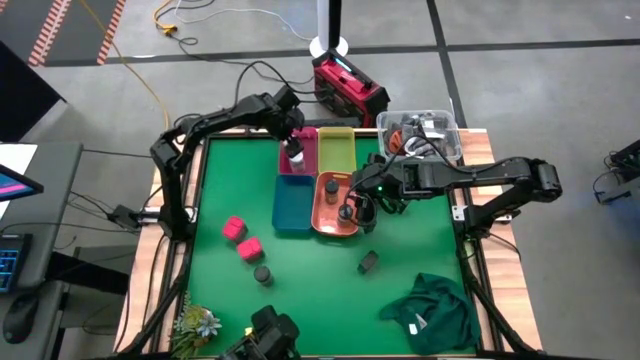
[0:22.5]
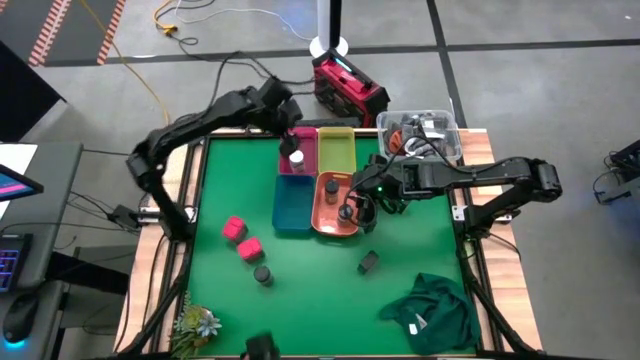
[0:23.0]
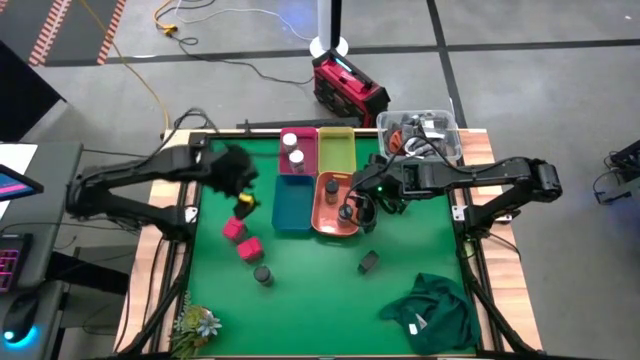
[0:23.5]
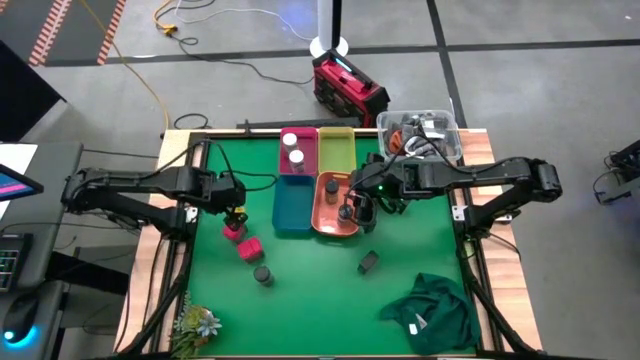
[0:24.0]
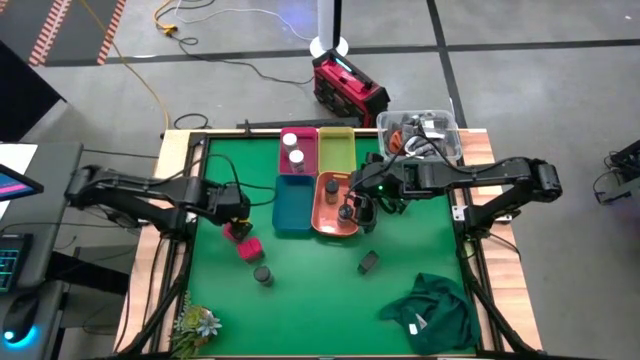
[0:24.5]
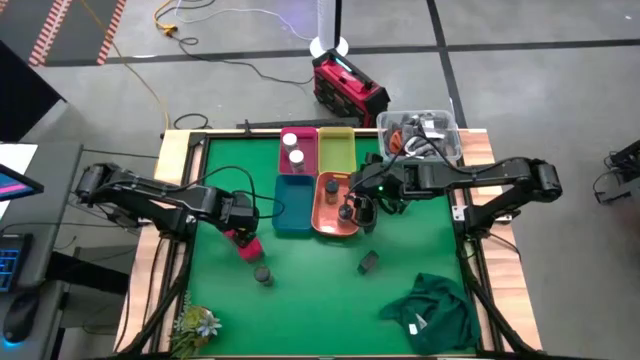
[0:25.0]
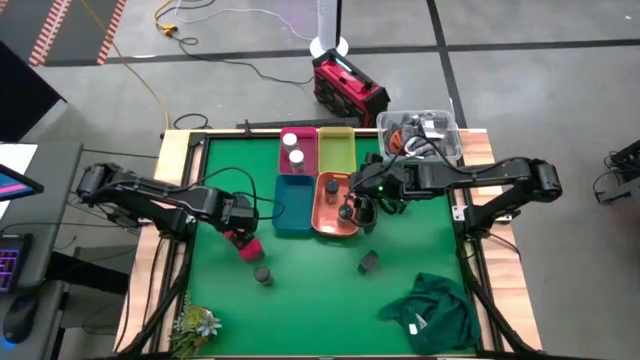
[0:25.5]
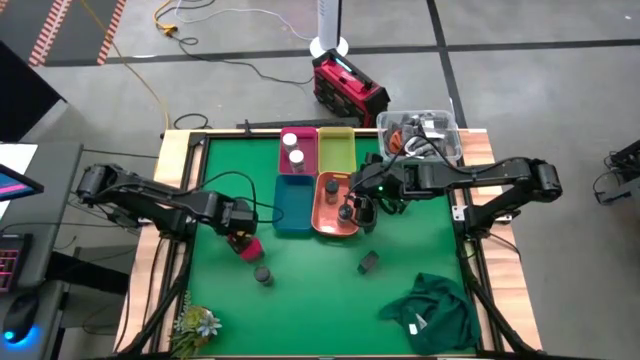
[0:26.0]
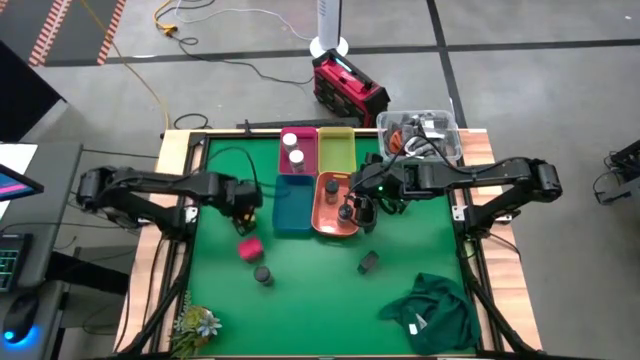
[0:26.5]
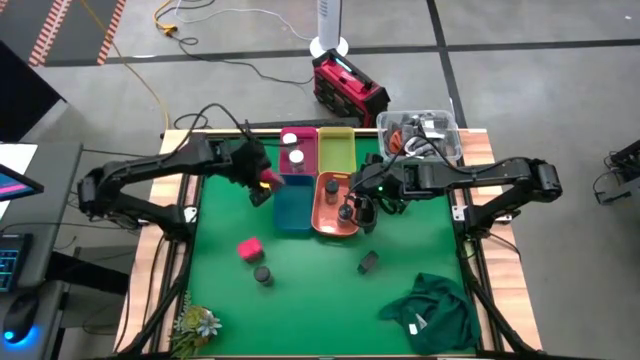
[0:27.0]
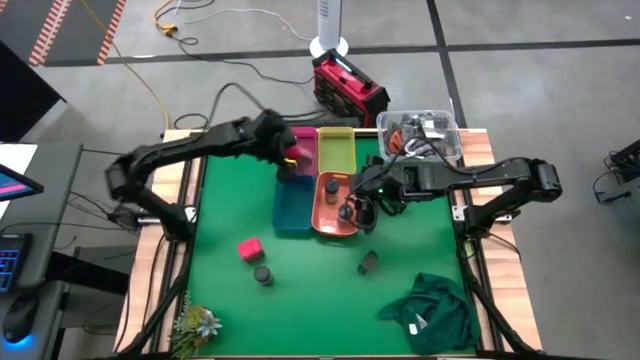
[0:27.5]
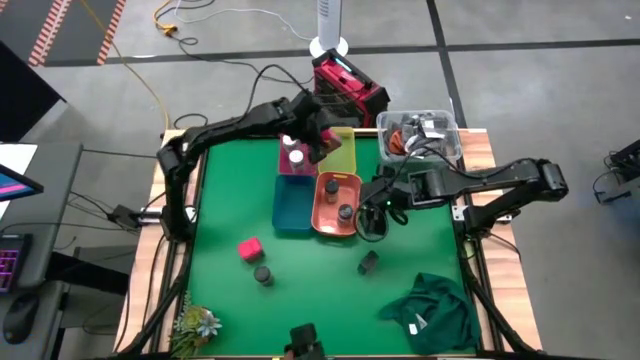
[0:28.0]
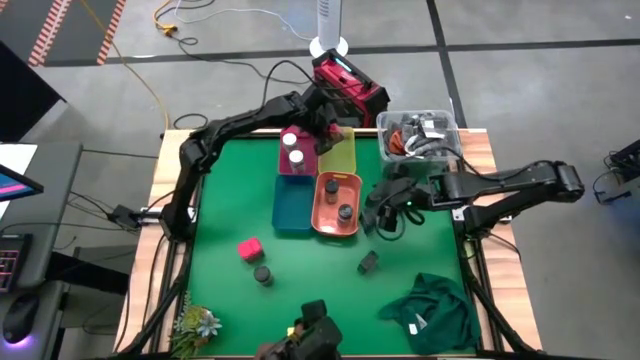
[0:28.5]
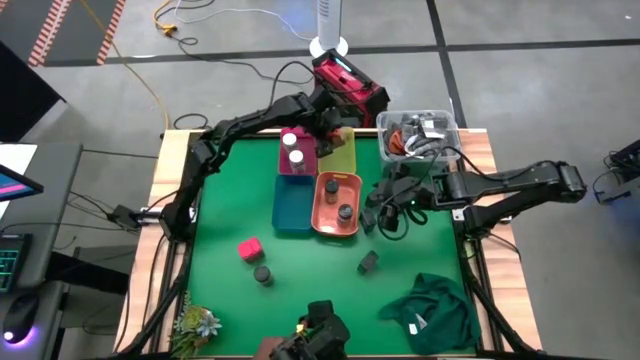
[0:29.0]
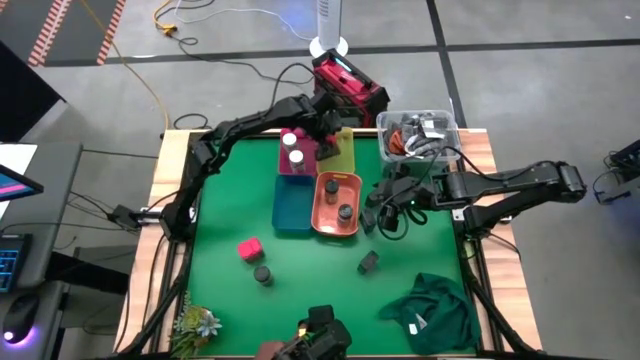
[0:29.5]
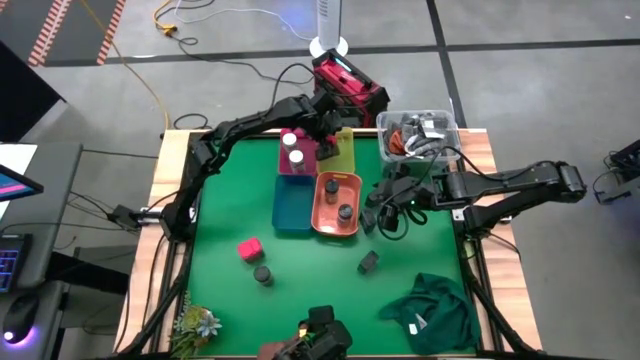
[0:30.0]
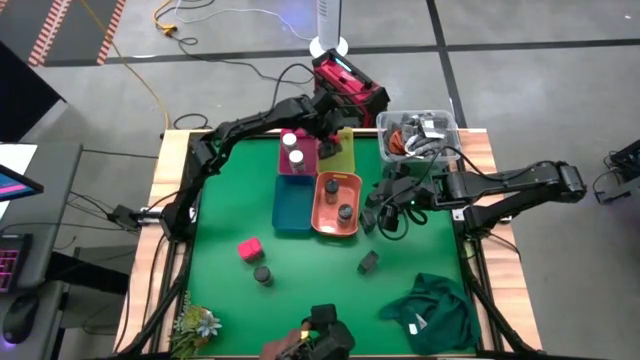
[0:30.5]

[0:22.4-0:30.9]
Task: Sort spices by type
Put the top red seasoning can into the yellow tray

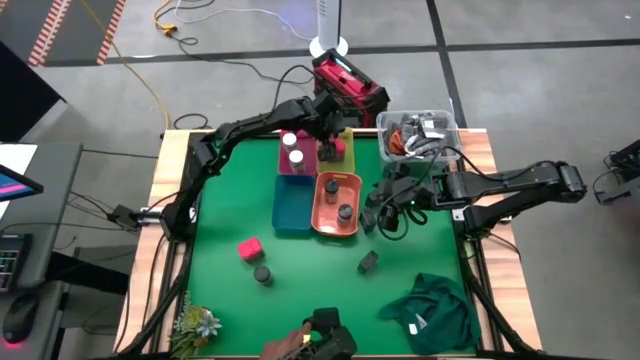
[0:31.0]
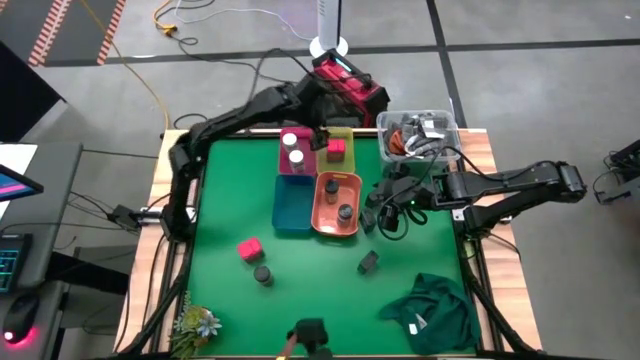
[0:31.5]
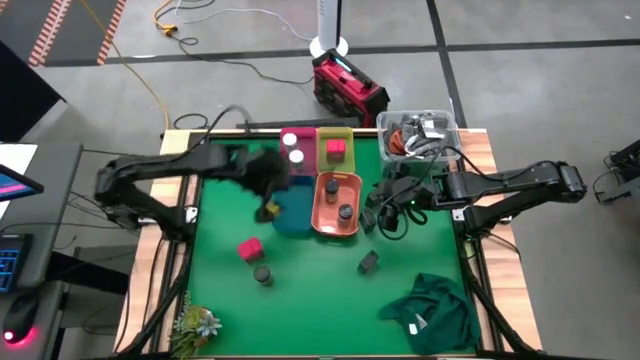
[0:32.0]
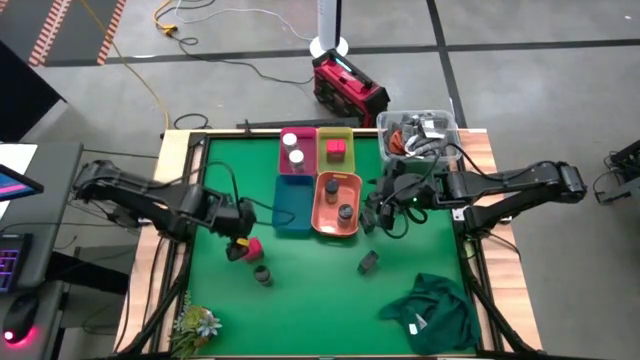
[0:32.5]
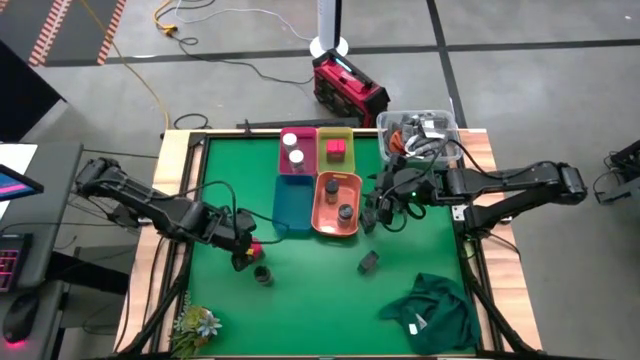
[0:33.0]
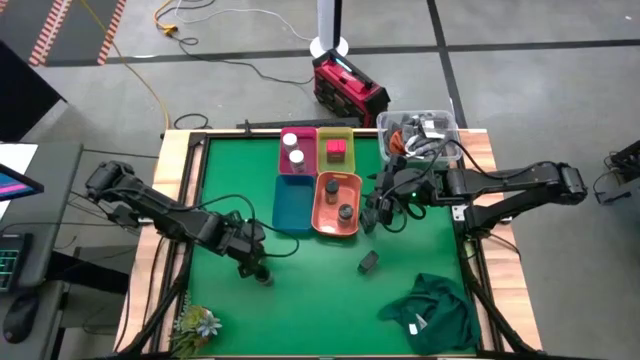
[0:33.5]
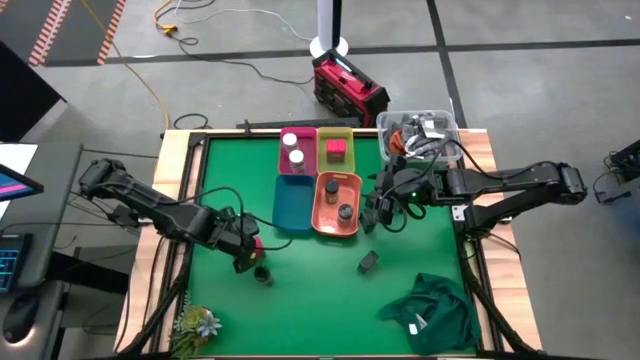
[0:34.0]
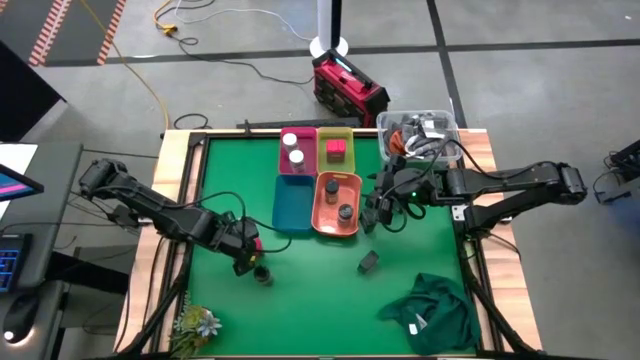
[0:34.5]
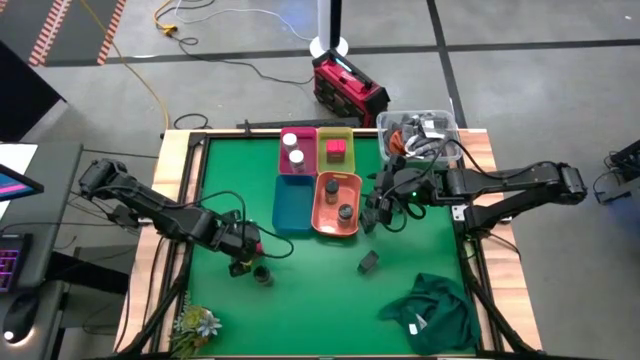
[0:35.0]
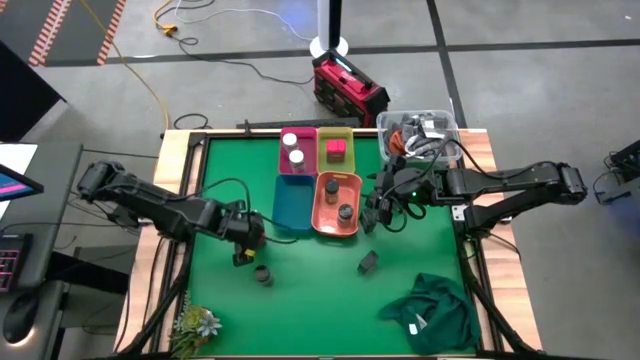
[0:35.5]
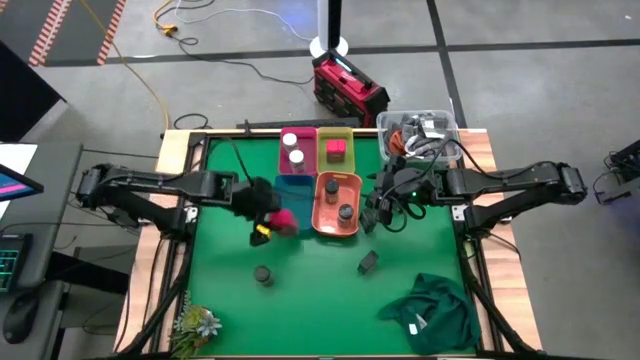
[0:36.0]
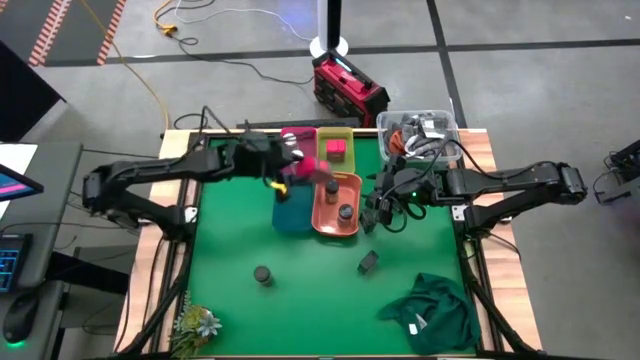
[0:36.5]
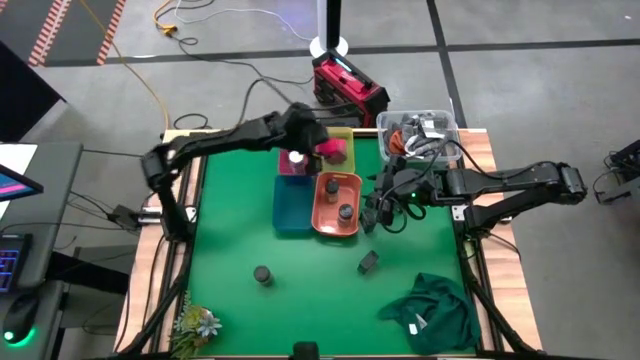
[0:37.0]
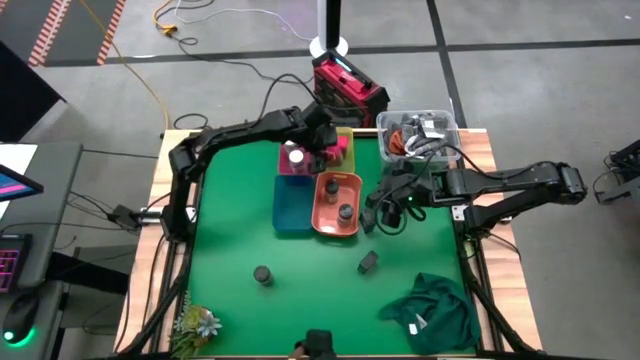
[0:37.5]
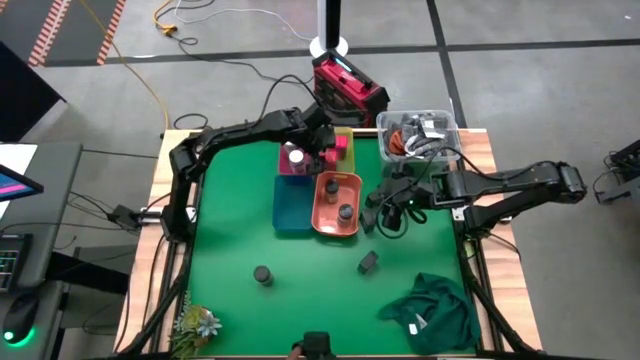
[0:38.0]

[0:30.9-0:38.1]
Put the red seasoning can into the yellow tray

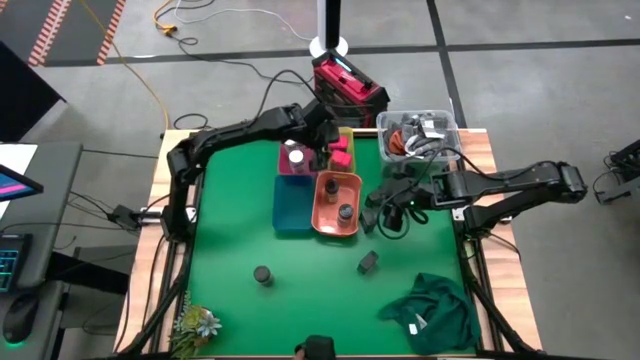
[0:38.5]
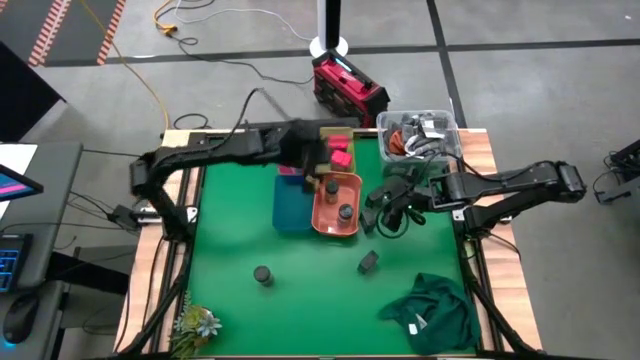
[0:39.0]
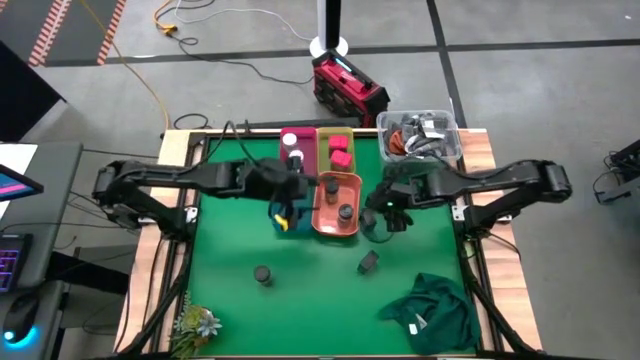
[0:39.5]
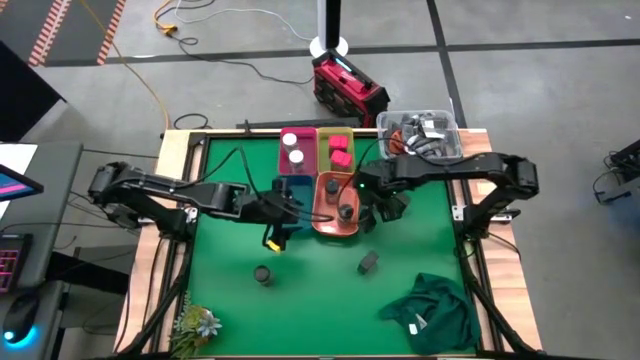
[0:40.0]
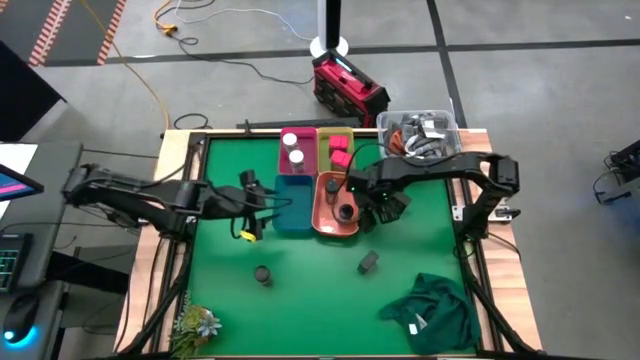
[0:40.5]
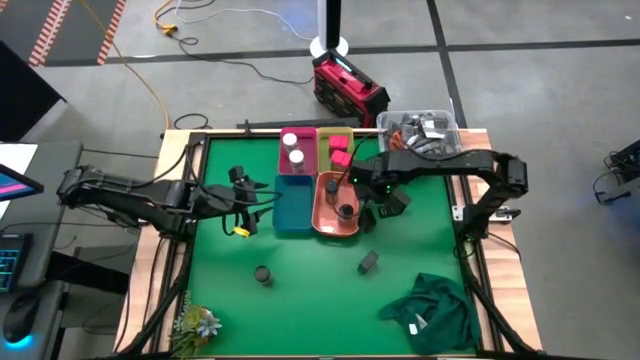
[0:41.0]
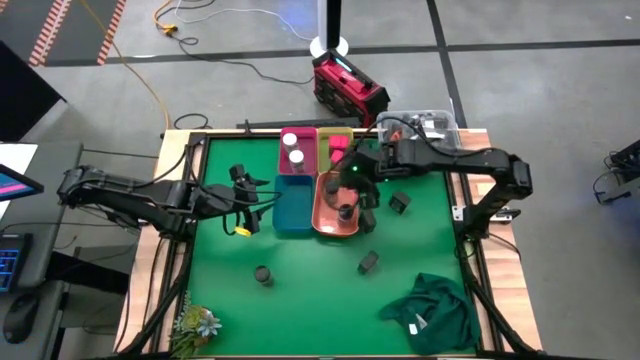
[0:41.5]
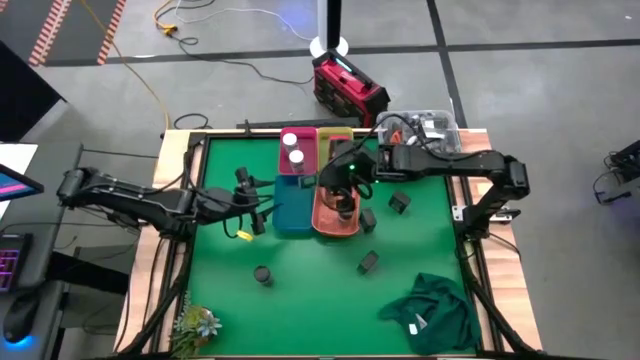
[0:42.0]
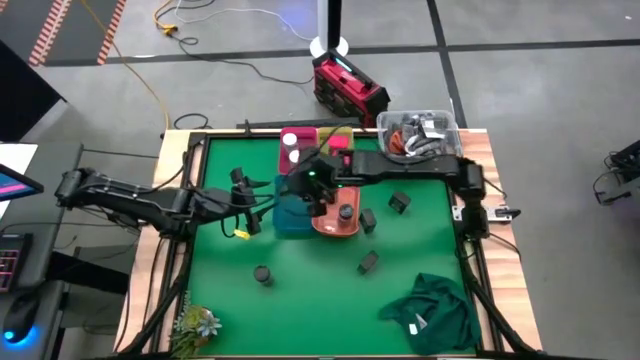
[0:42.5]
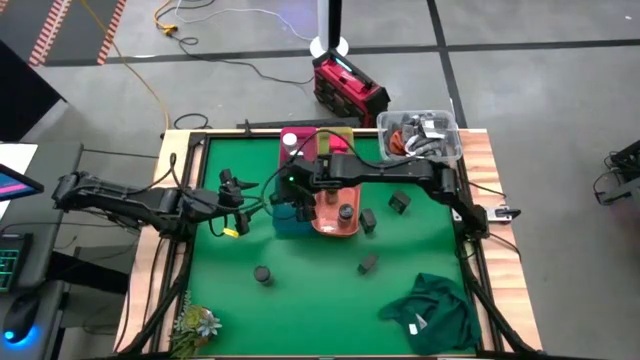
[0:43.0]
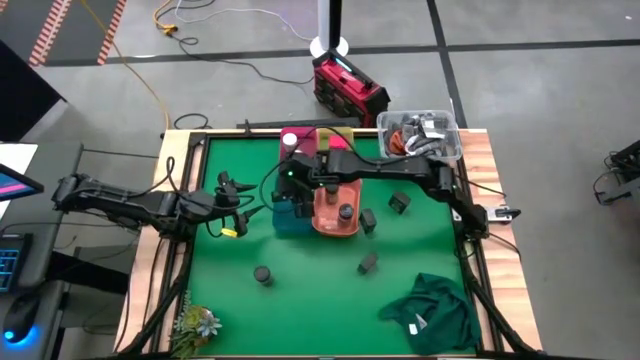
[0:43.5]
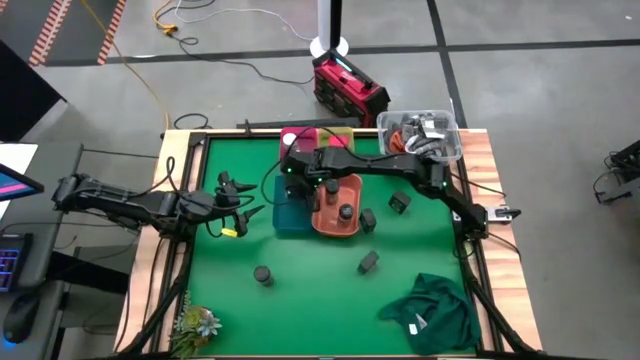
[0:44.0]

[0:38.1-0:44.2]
Put the top left black seasoning can into the blue tray
